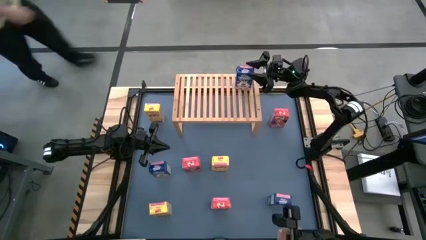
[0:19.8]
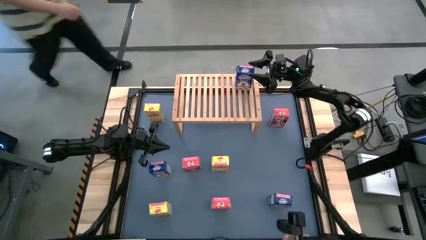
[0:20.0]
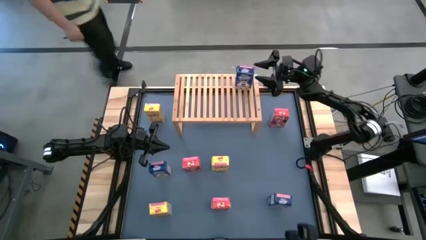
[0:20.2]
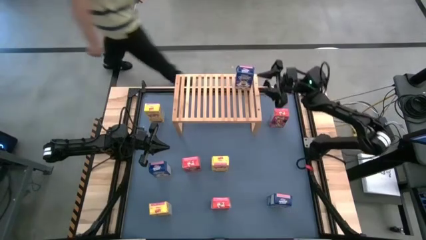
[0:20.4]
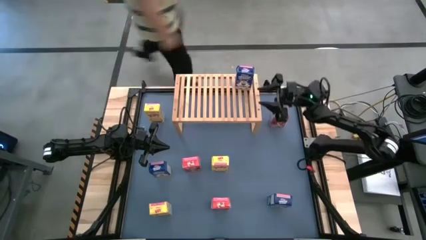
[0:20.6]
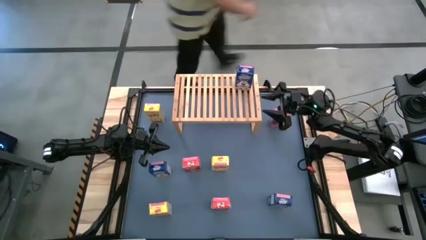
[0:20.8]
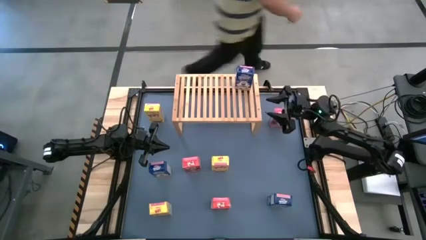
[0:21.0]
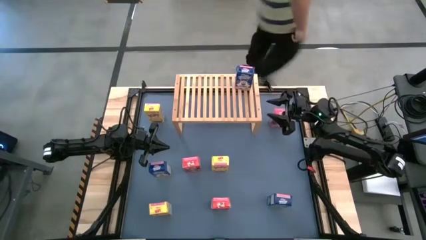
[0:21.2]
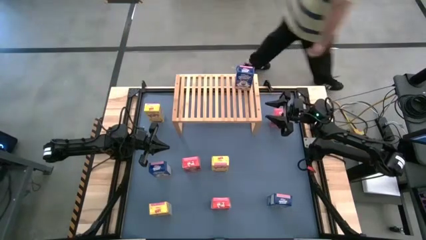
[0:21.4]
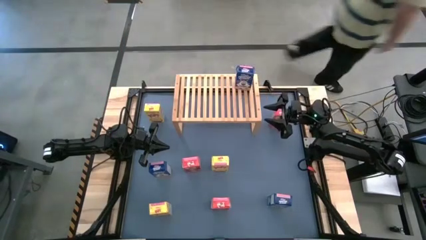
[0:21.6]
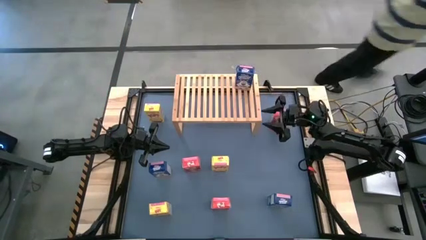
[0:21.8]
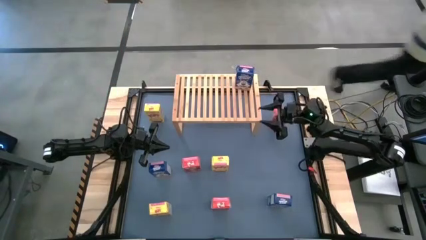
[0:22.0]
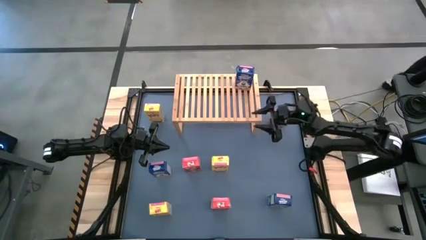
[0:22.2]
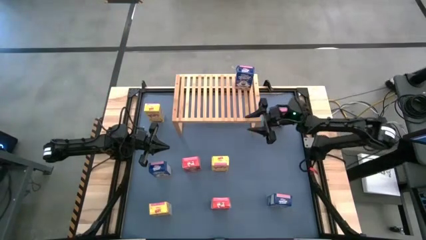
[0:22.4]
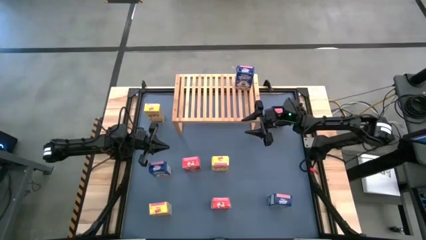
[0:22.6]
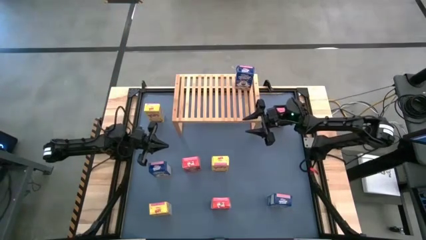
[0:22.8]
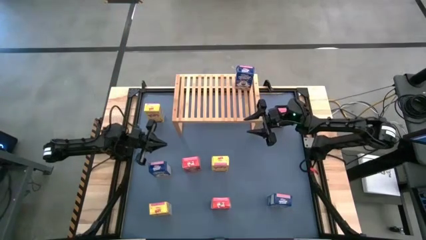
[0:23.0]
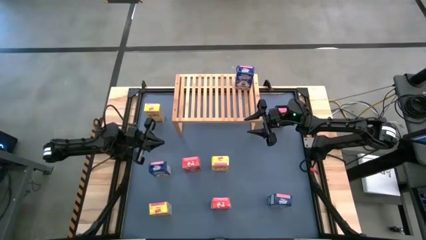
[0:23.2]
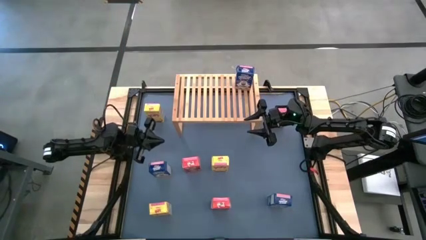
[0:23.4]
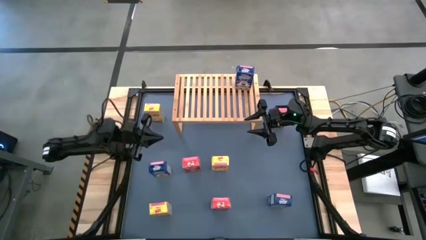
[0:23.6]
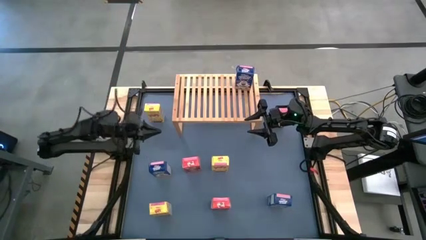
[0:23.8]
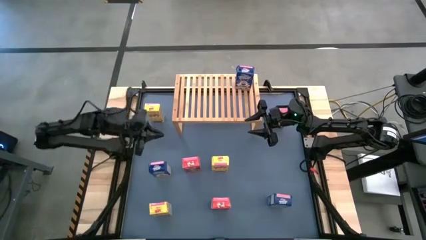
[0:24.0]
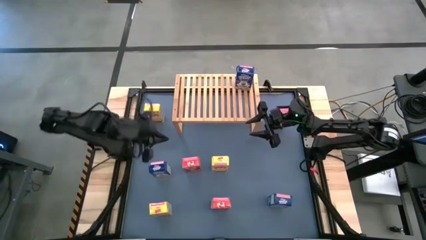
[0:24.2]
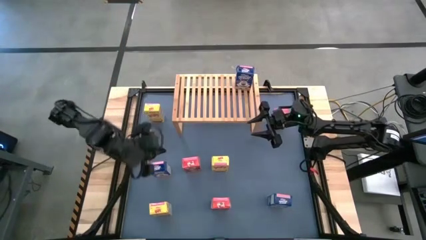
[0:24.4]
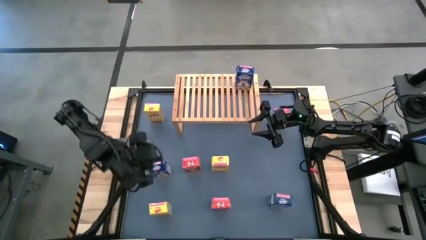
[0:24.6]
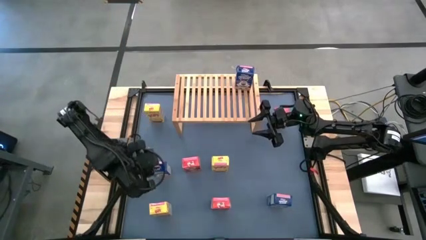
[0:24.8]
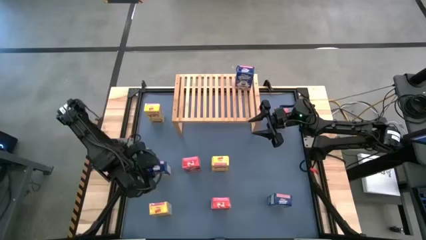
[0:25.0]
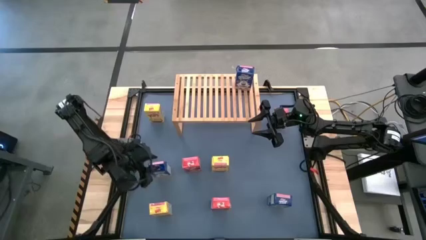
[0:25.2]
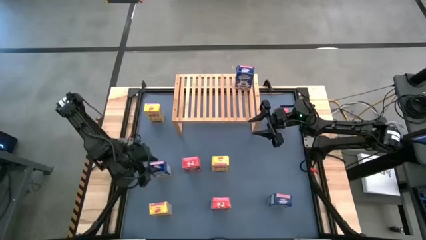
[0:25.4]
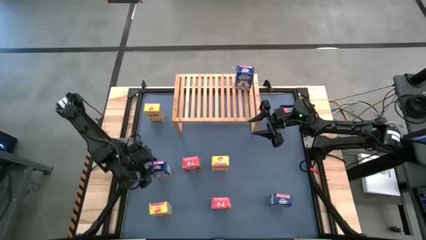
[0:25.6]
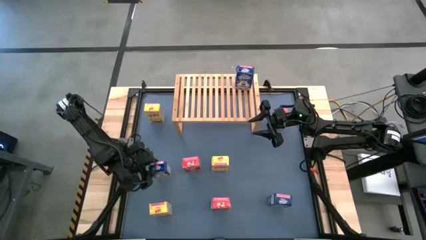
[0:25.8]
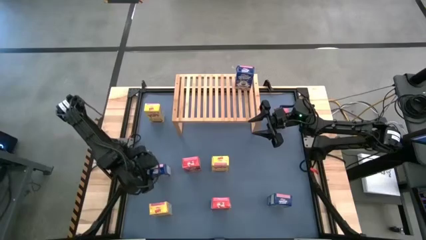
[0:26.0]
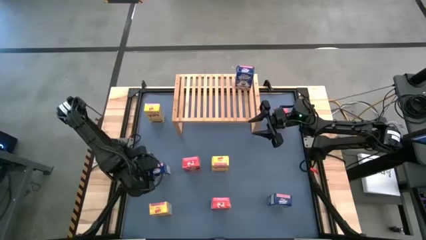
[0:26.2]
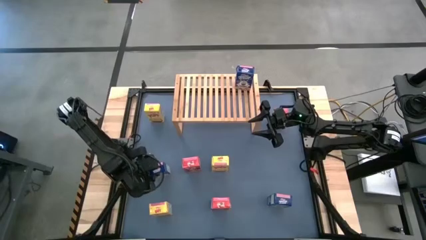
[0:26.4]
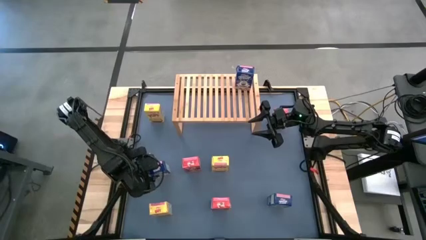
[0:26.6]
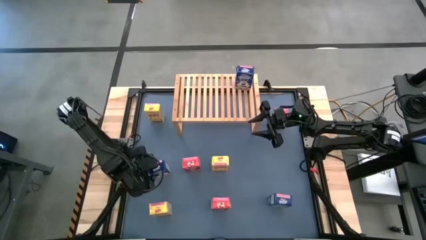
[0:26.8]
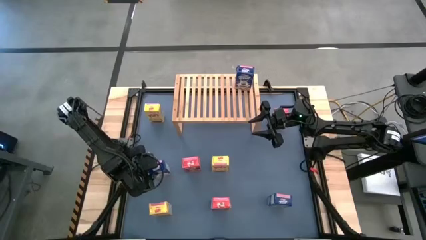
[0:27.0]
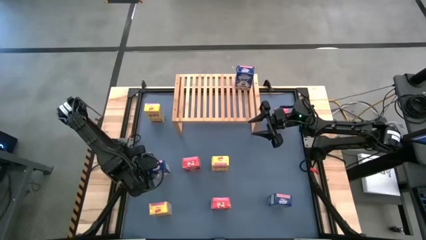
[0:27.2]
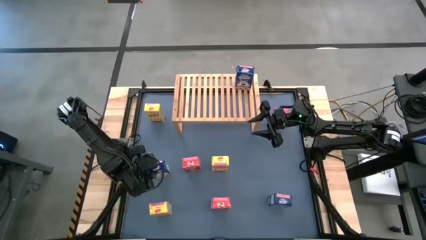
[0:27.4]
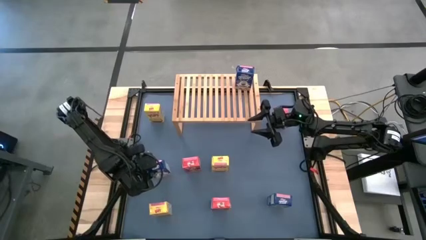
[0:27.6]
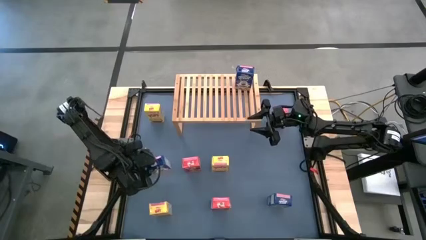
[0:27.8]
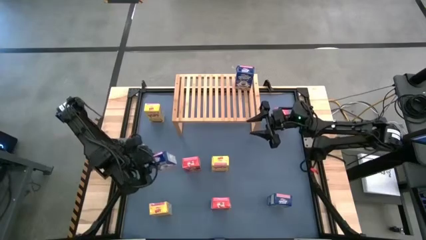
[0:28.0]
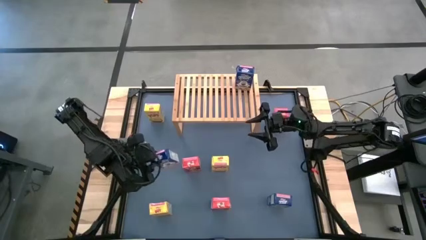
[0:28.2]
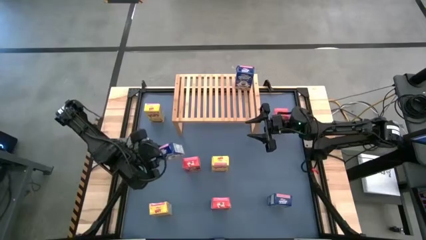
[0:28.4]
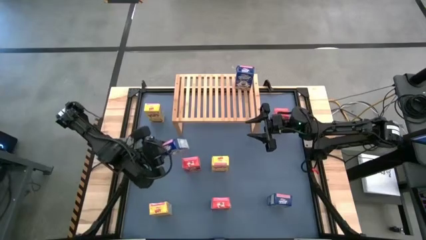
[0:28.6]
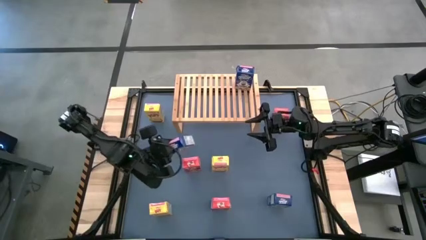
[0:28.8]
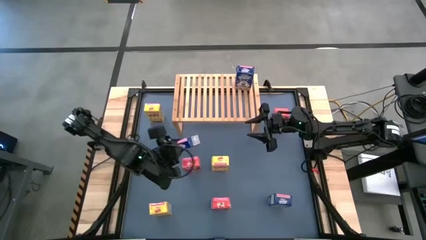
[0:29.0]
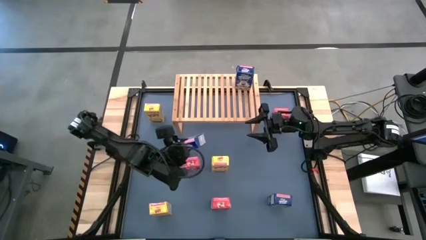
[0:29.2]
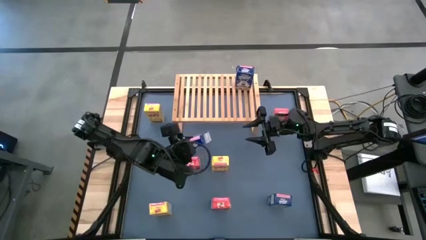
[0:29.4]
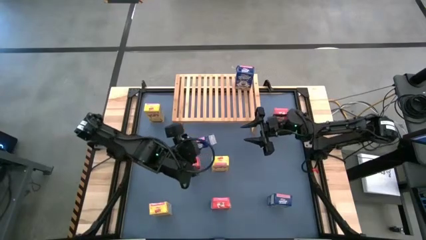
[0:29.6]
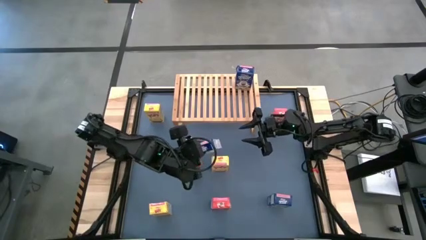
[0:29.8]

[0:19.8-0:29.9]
Task: Stack cereal on shelf
Put the left blue cereal box on the shelf aligned with the other blue cereal box
